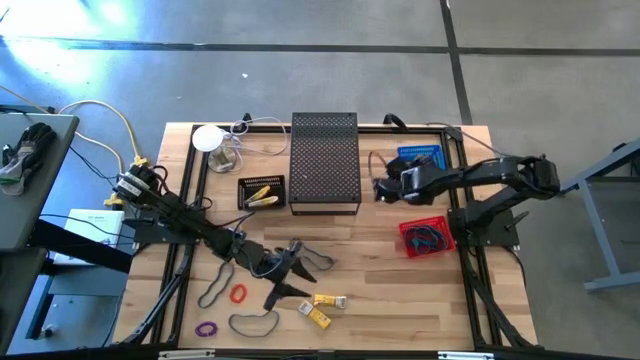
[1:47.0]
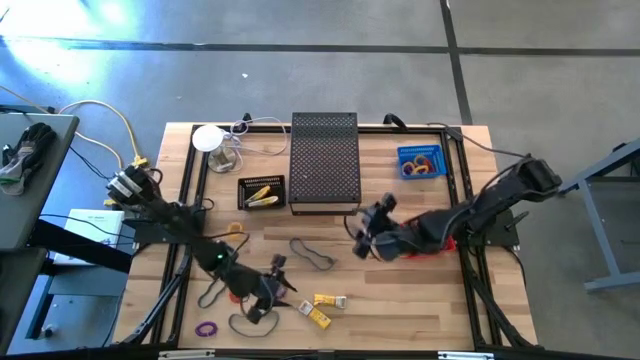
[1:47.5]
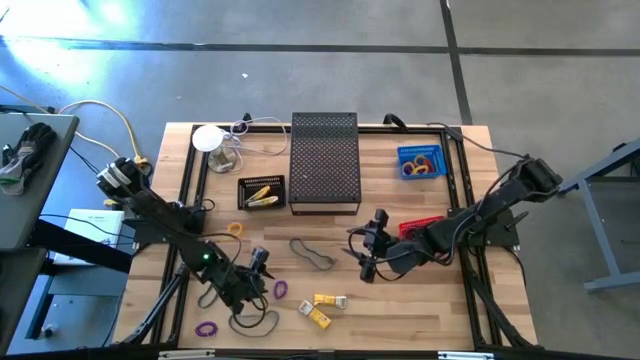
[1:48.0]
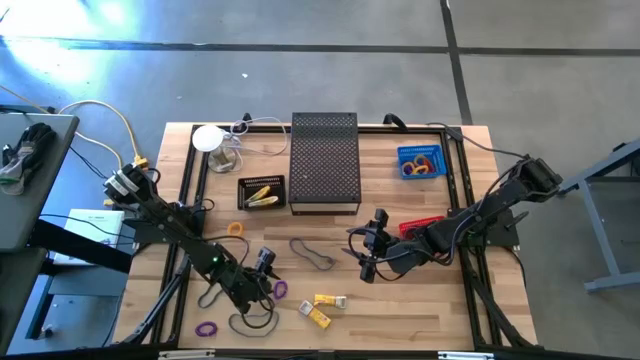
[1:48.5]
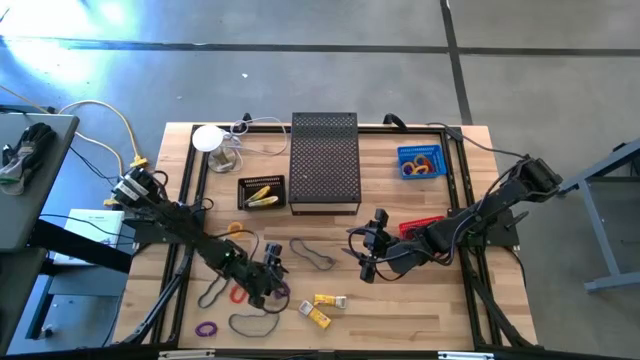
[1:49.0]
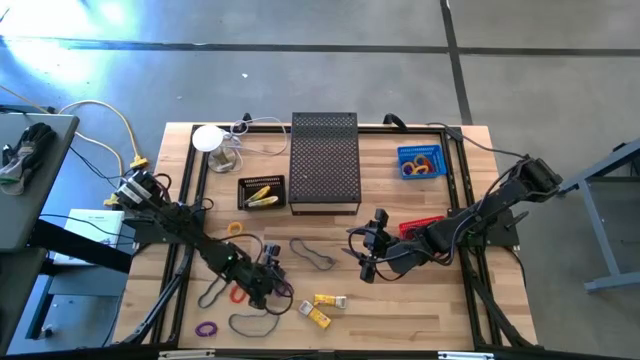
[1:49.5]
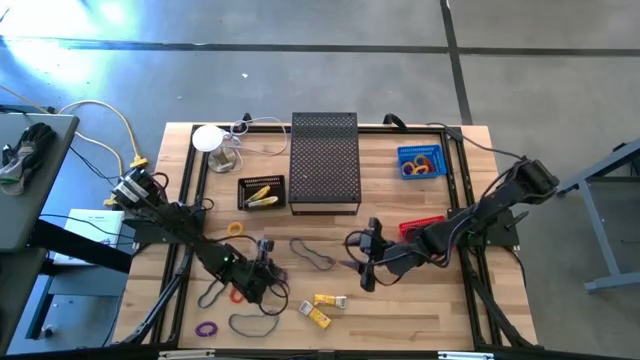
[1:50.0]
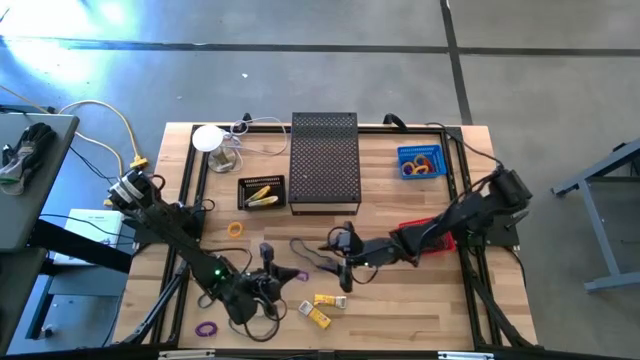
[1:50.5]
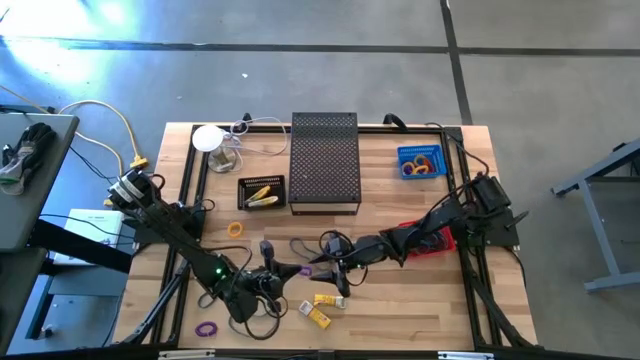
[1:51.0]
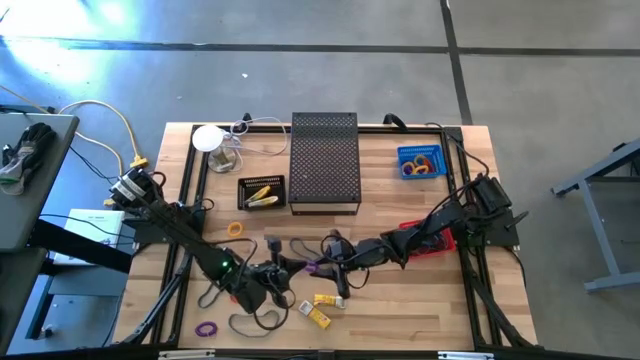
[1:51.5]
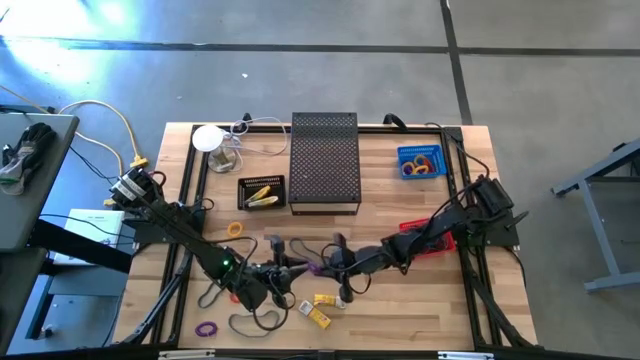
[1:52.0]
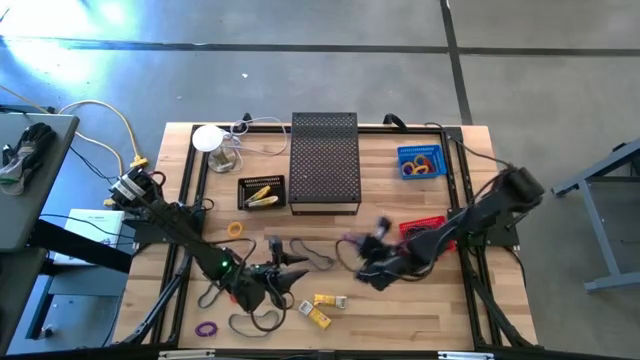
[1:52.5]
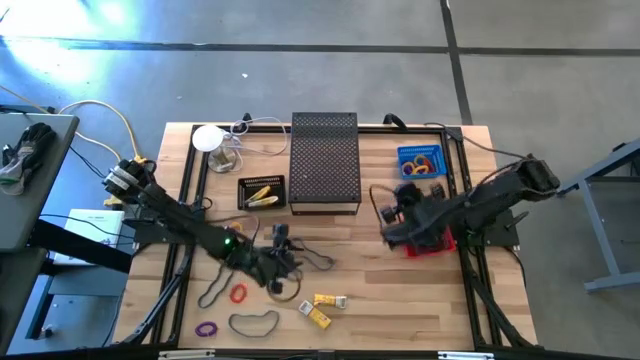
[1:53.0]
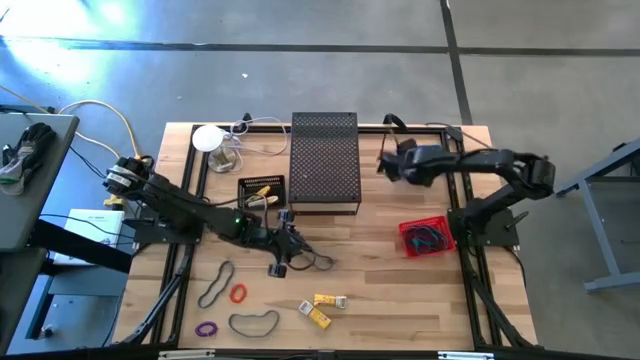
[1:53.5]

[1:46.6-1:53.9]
Task: Pick & Place Office Desk Supplies
Put the violet spring keychain into the blue bin

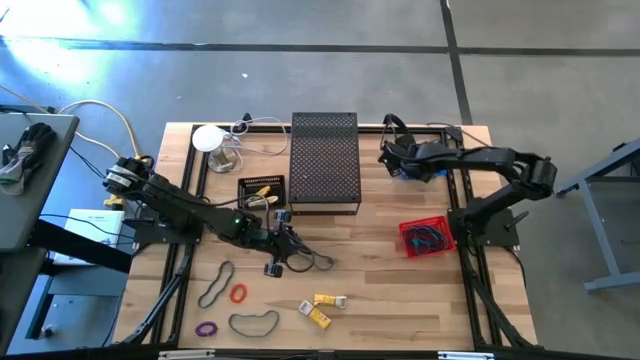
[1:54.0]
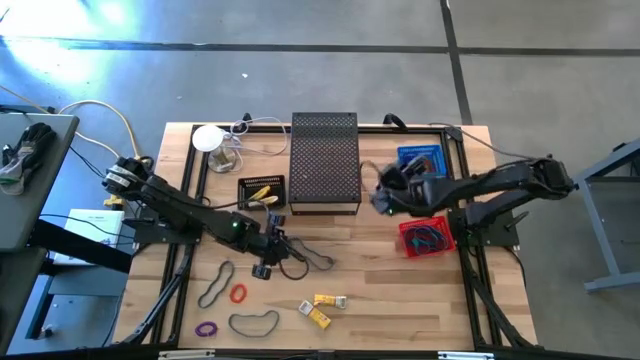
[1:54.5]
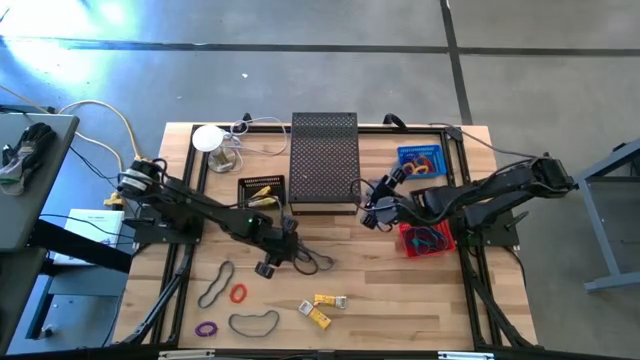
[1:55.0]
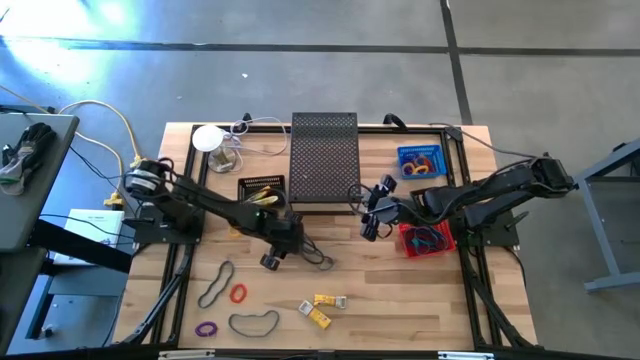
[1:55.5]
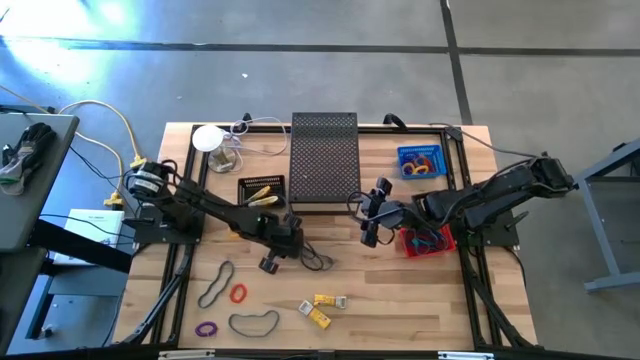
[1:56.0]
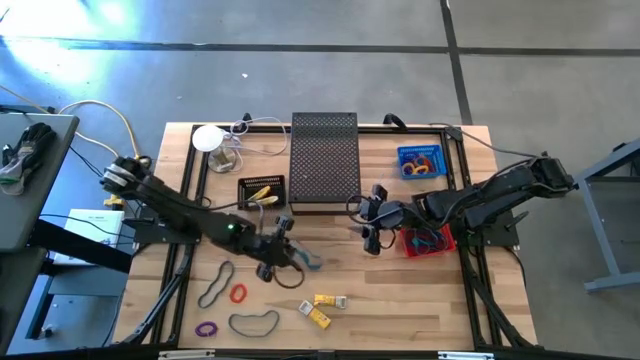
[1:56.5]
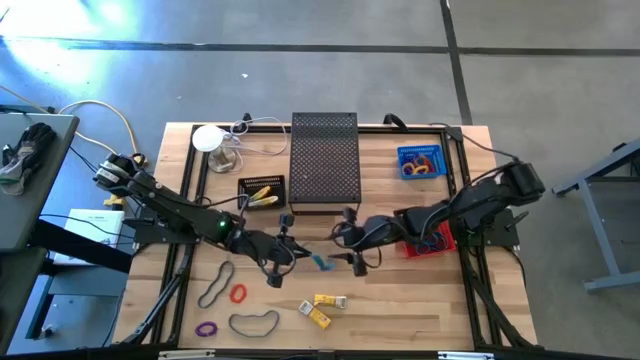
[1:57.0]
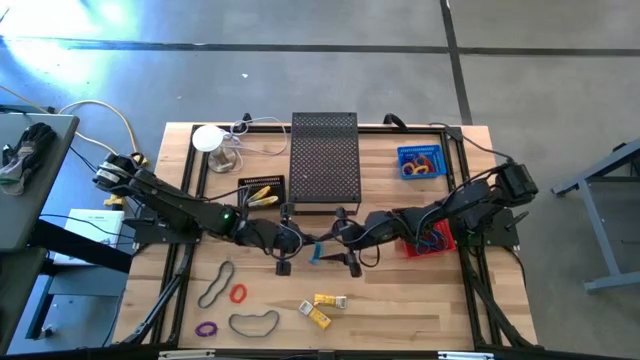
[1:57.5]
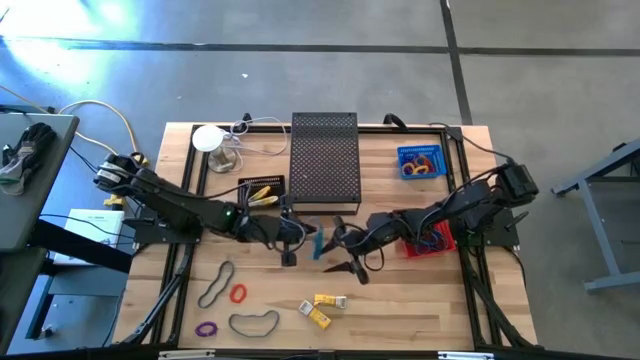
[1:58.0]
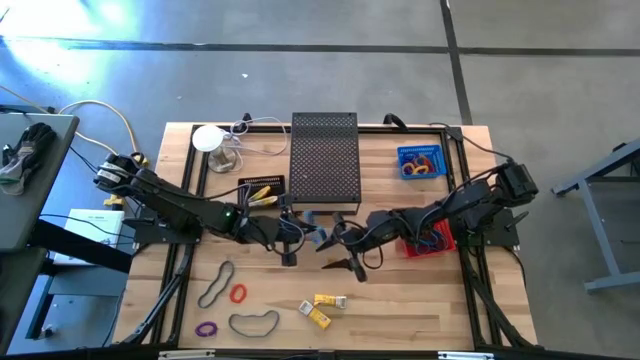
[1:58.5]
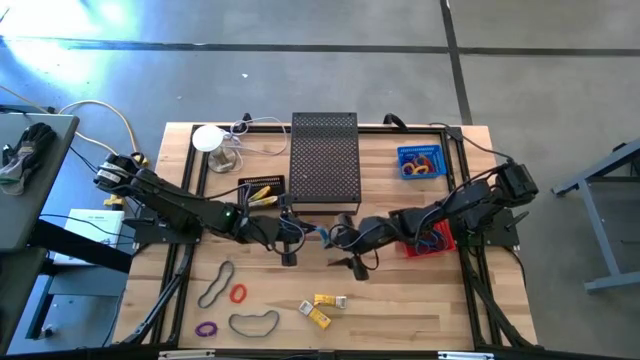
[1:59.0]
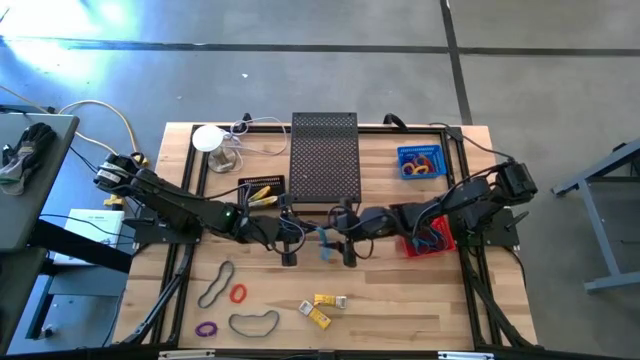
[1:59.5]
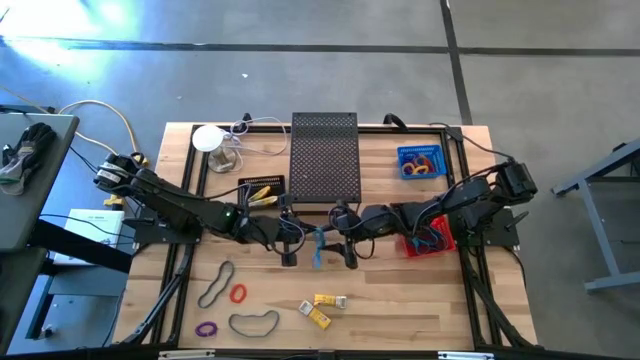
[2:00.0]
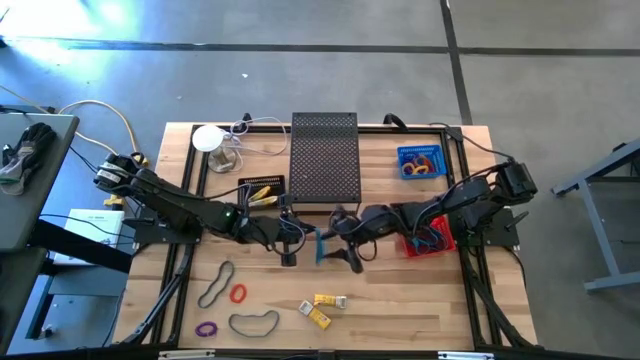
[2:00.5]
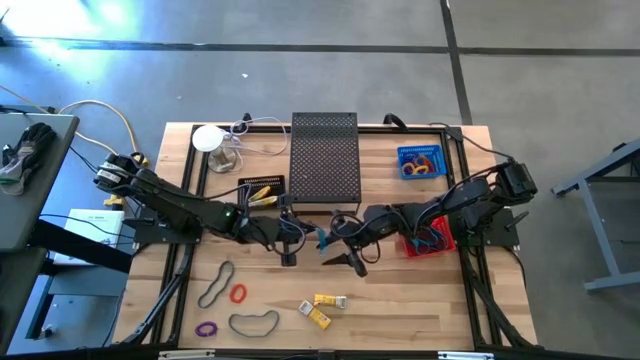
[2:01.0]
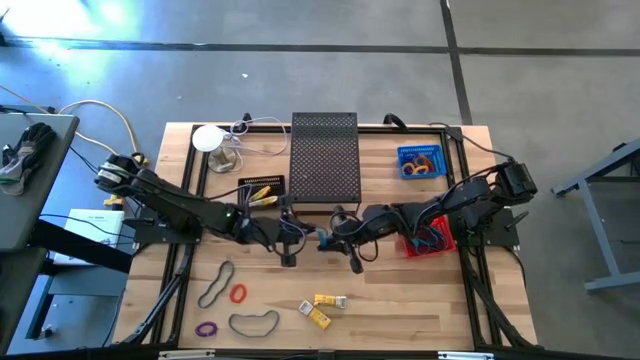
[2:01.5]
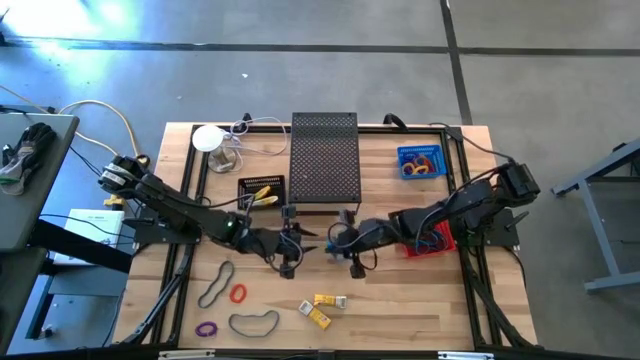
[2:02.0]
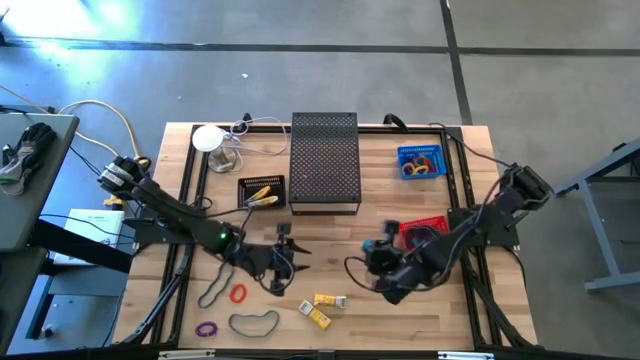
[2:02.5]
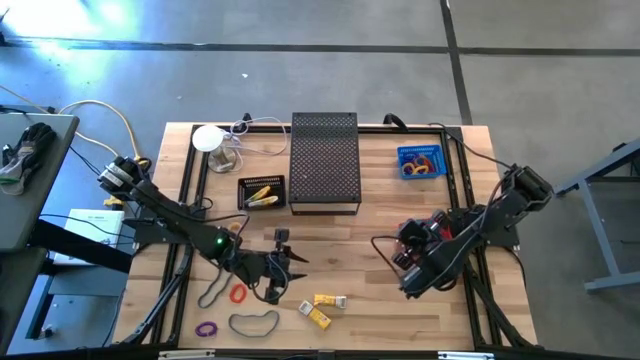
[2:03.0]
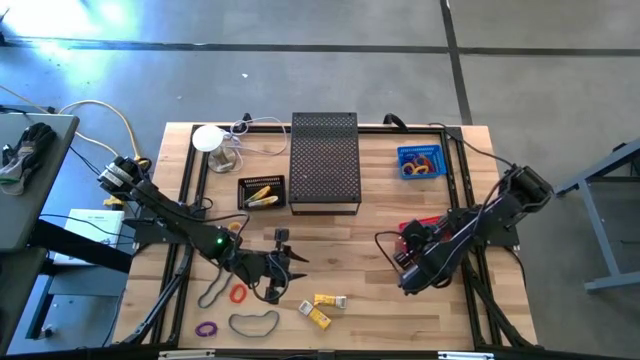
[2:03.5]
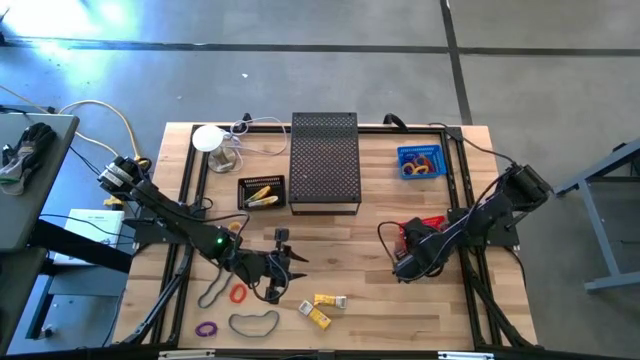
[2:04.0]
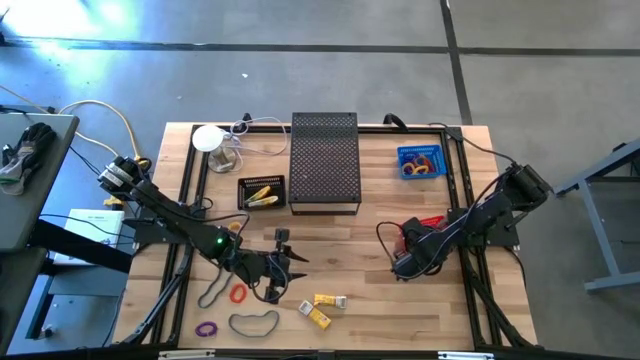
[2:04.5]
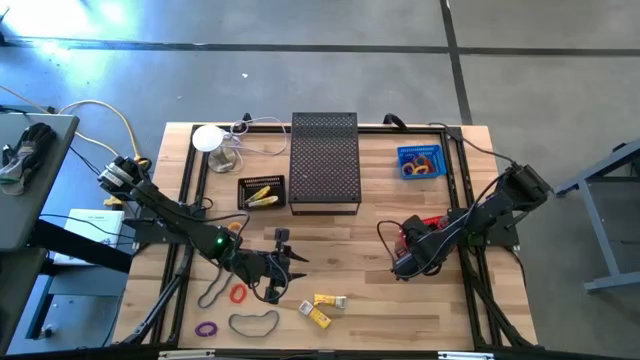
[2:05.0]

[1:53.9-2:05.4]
Put the blue rubber band into the red bin

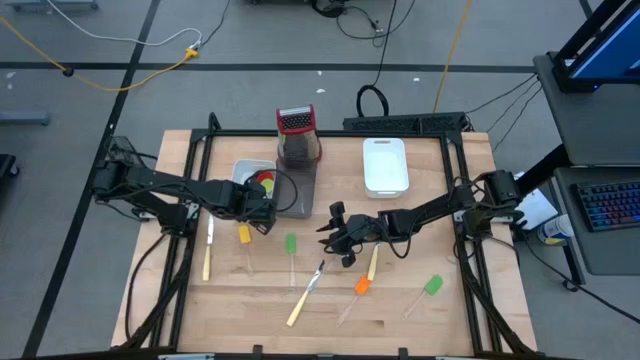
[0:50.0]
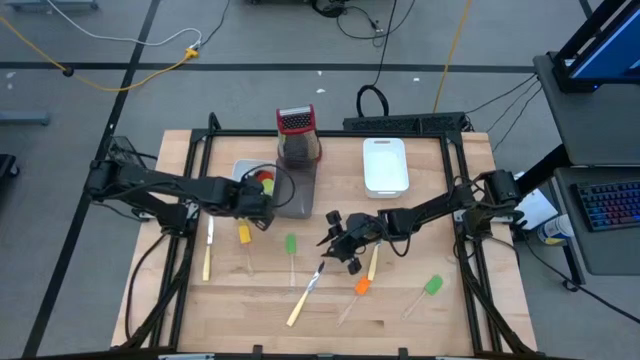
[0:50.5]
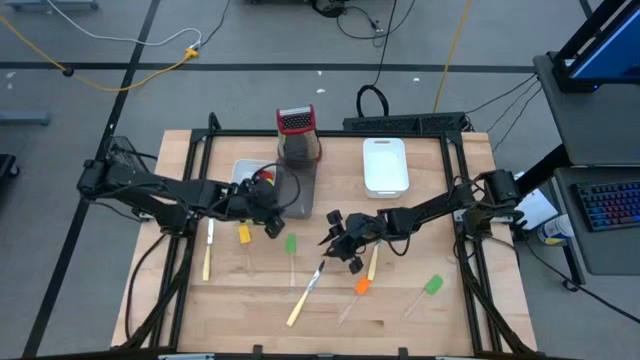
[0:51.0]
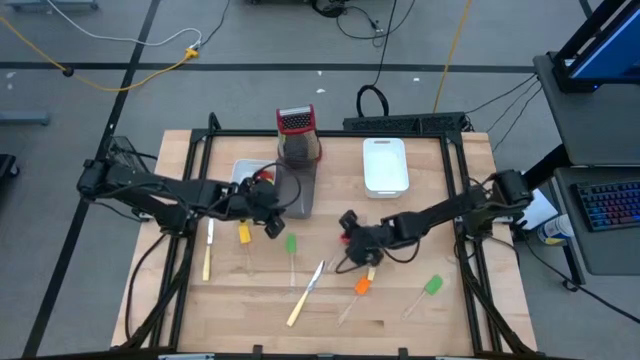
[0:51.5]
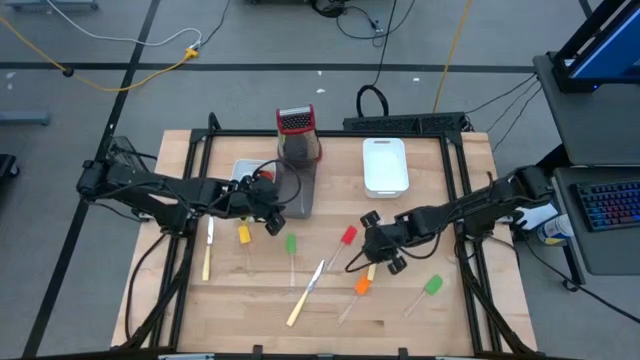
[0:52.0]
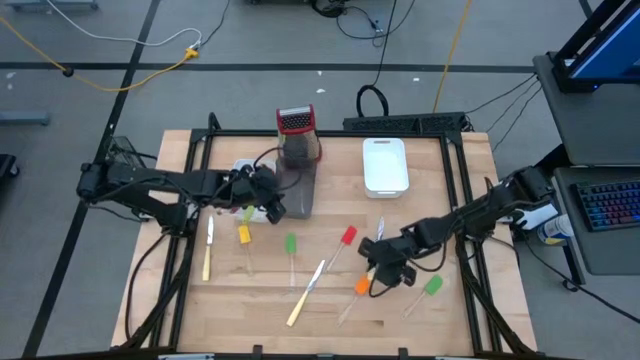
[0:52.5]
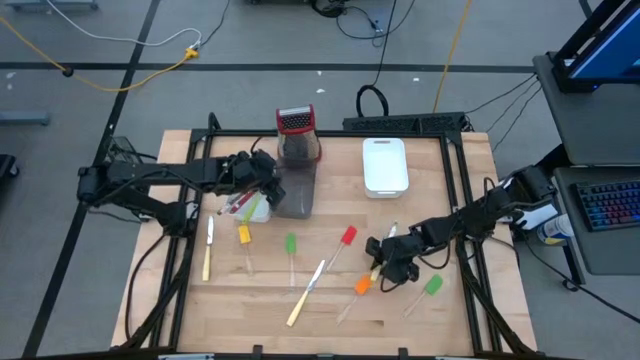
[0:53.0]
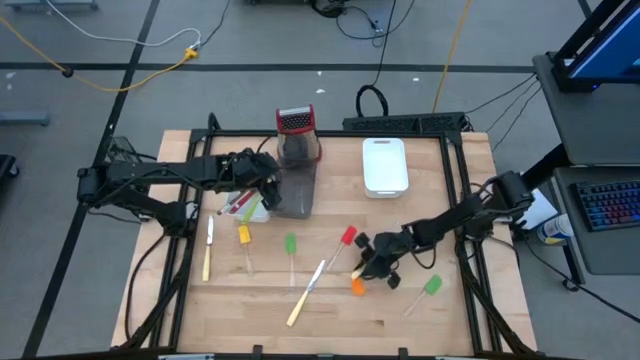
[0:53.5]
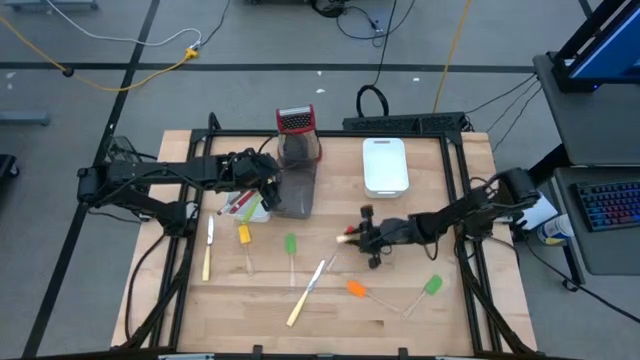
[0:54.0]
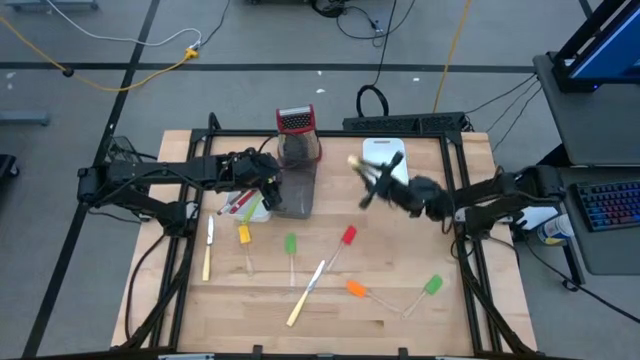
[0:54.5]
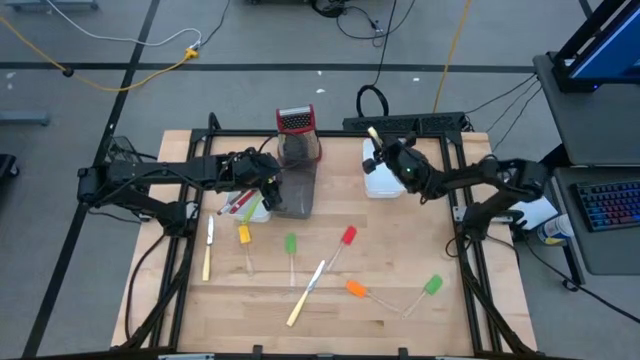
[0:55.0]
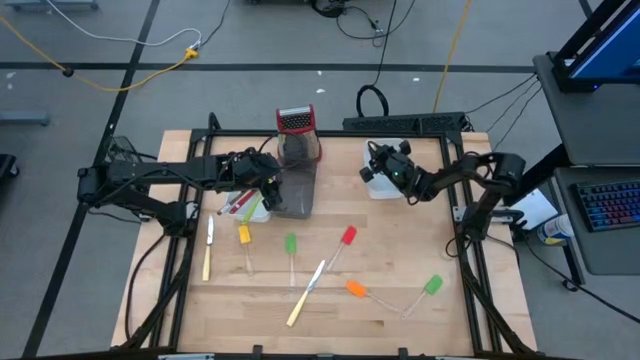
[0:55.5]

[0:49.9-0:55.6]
Task: Pick & Place Kitchen Items
Put the right yellow knife into the right white bin
